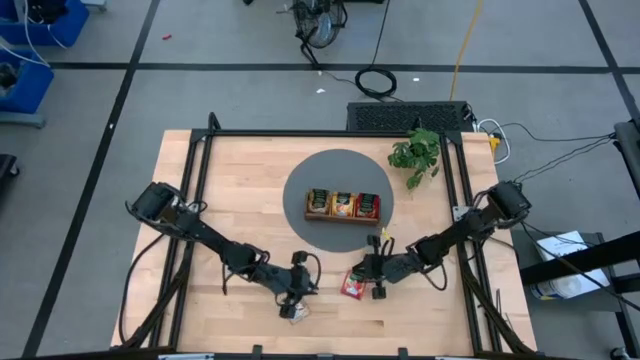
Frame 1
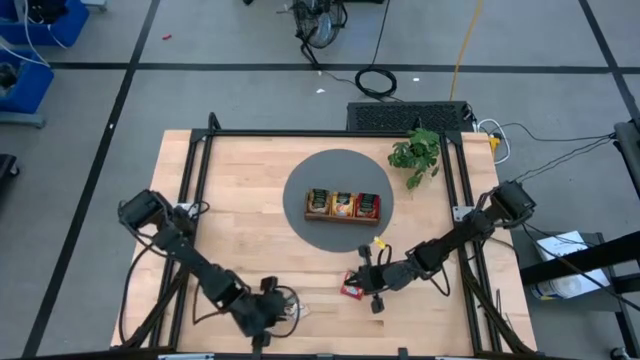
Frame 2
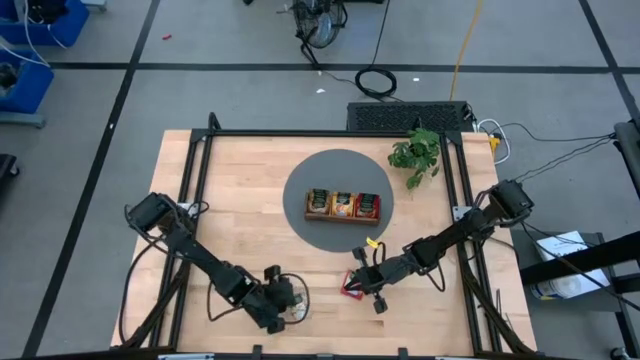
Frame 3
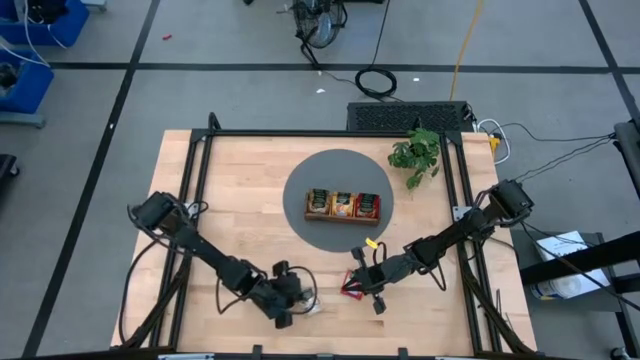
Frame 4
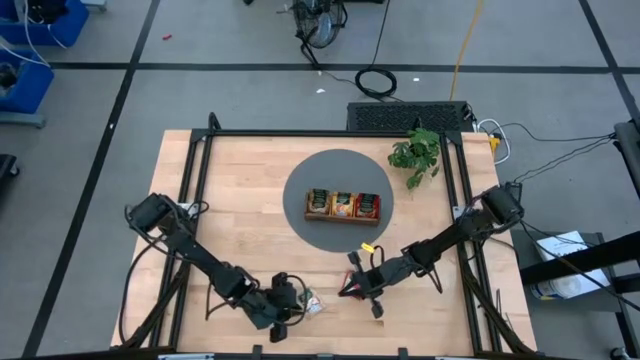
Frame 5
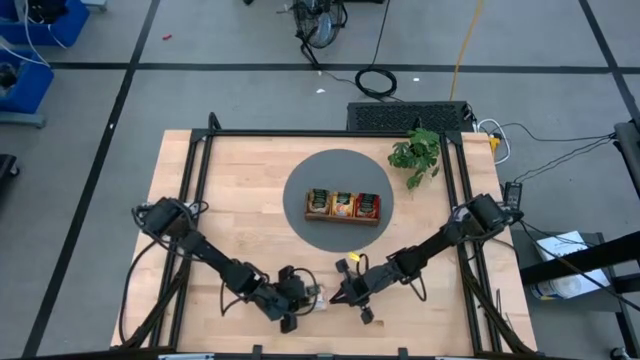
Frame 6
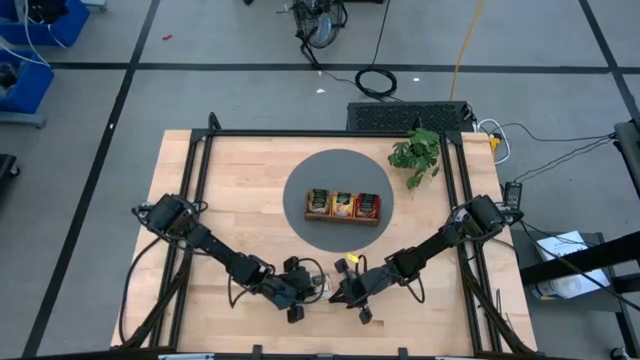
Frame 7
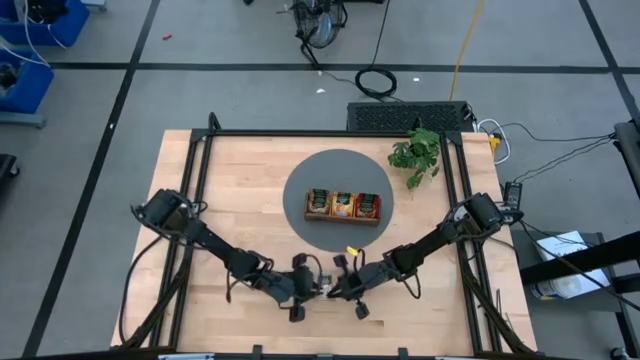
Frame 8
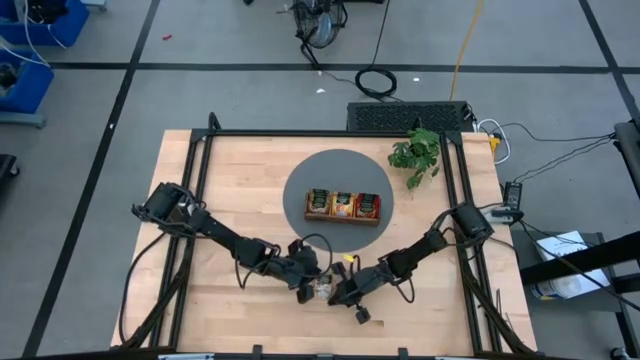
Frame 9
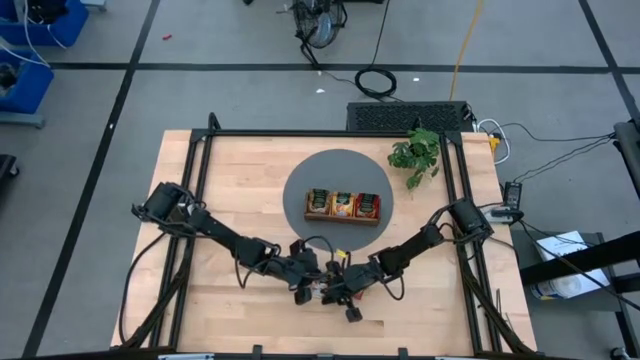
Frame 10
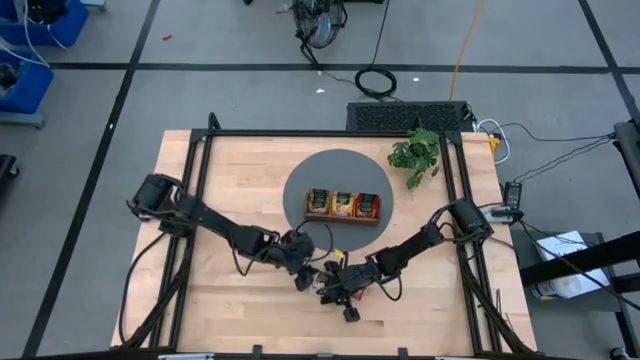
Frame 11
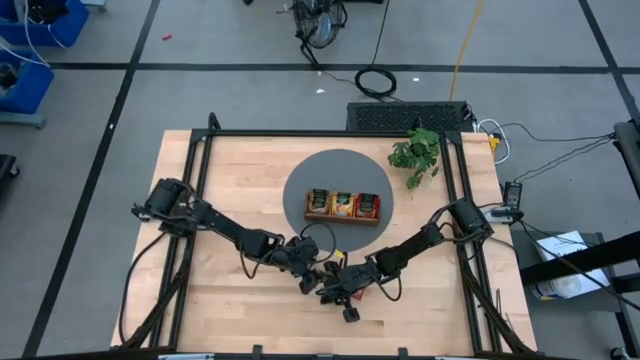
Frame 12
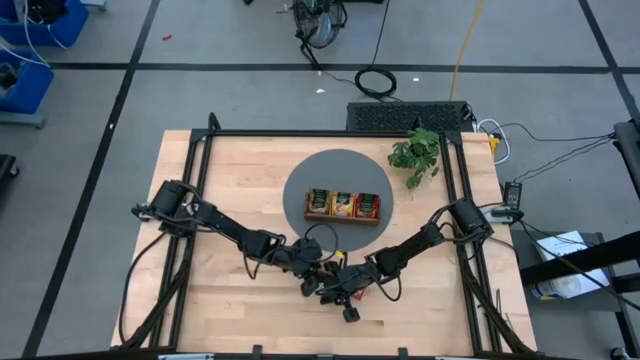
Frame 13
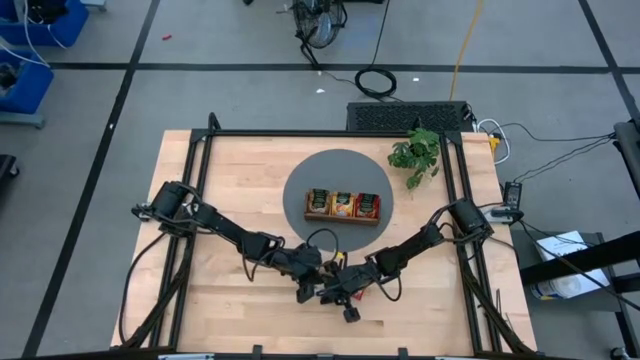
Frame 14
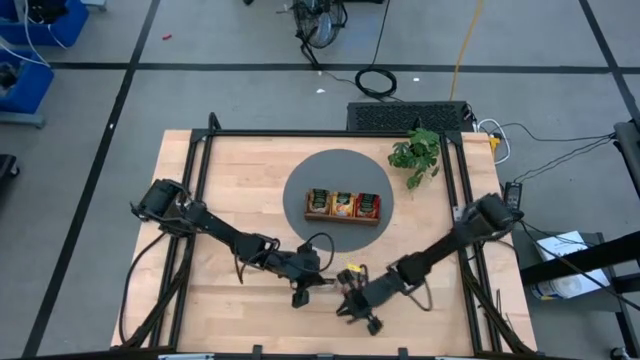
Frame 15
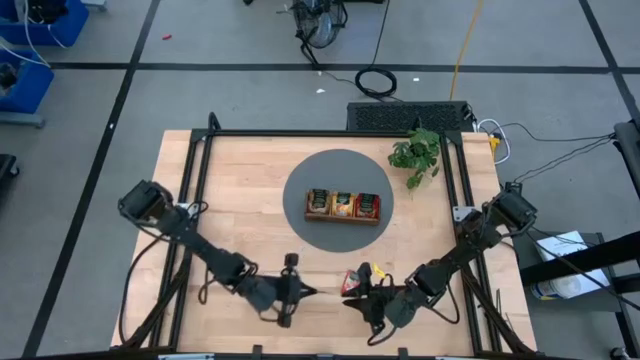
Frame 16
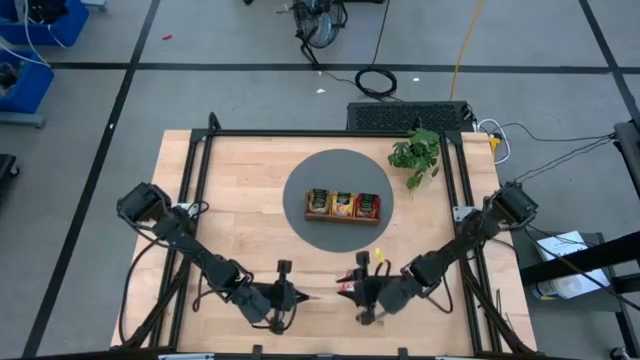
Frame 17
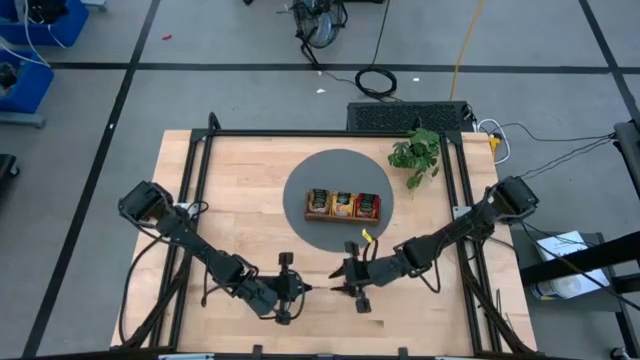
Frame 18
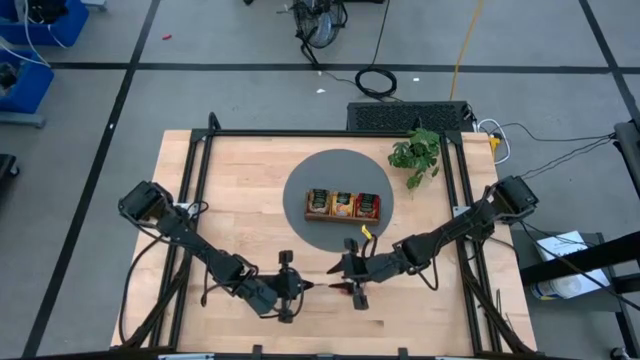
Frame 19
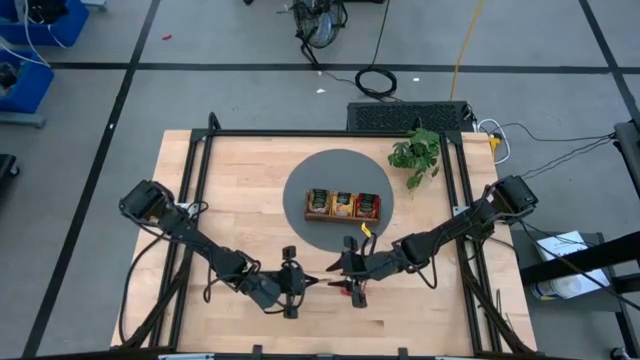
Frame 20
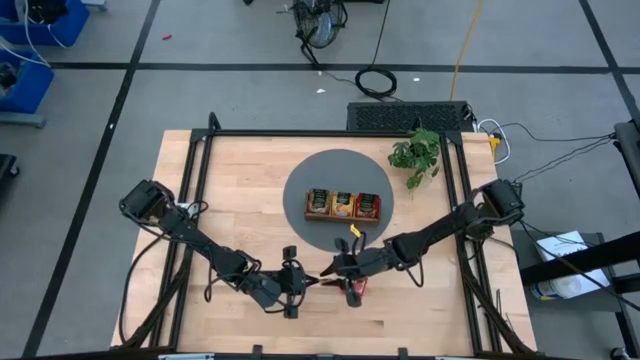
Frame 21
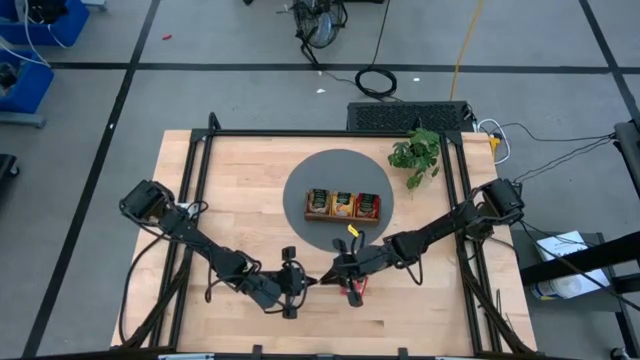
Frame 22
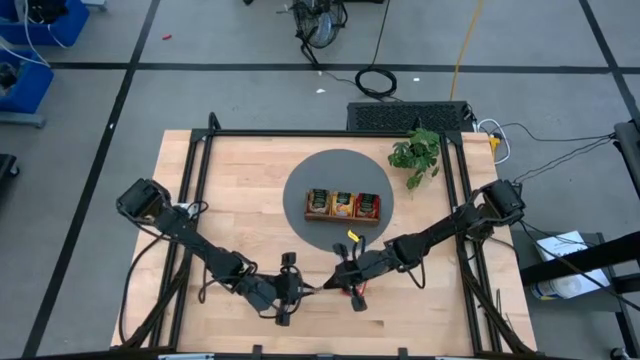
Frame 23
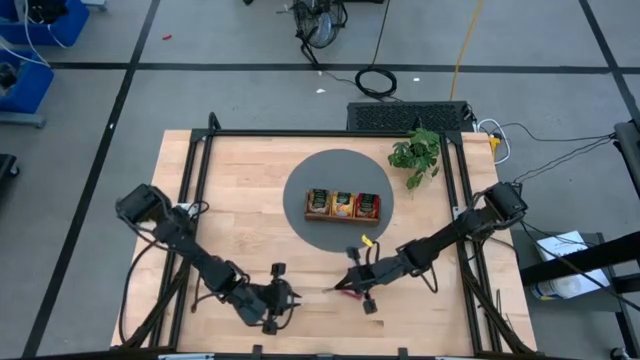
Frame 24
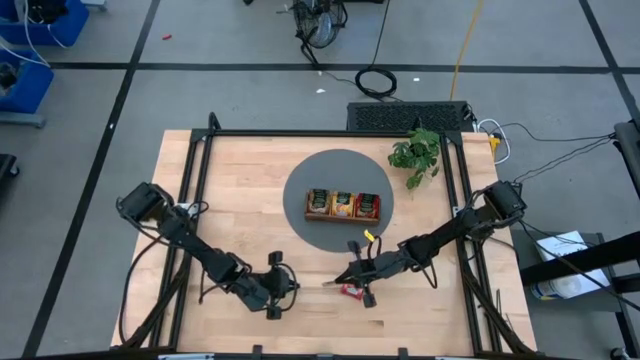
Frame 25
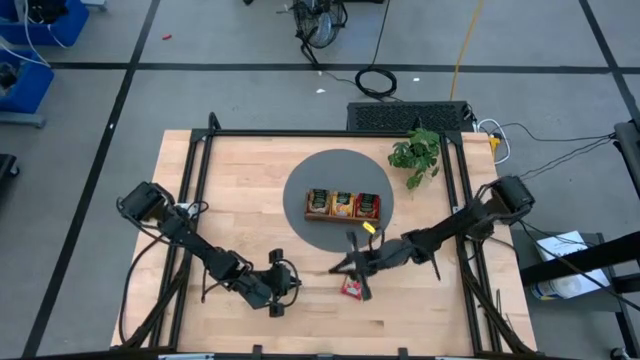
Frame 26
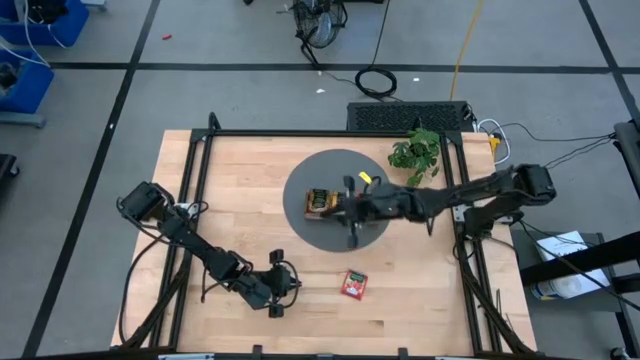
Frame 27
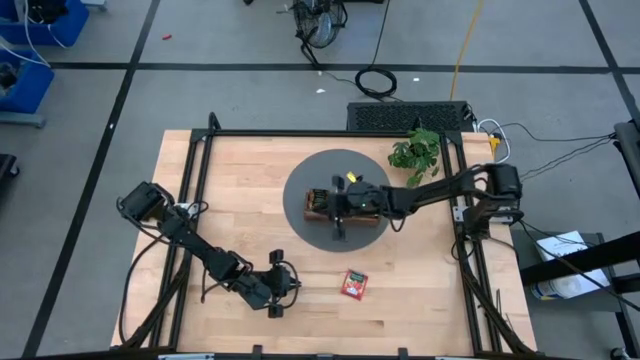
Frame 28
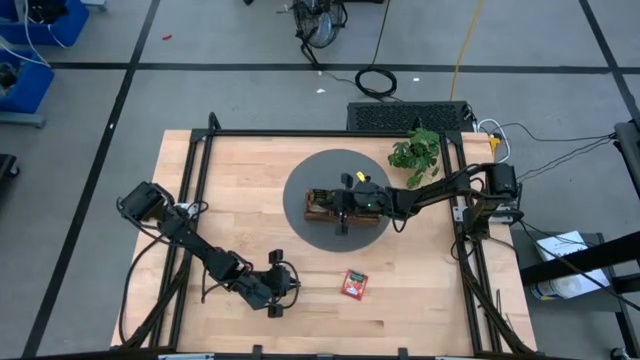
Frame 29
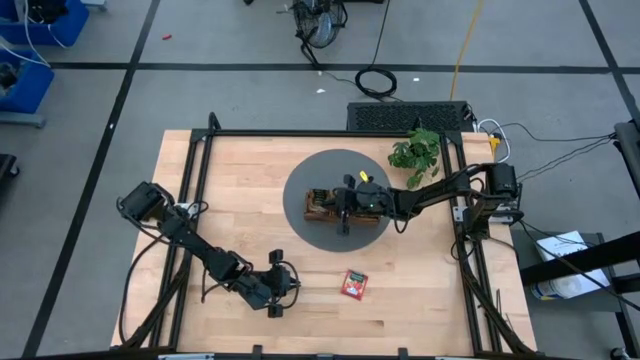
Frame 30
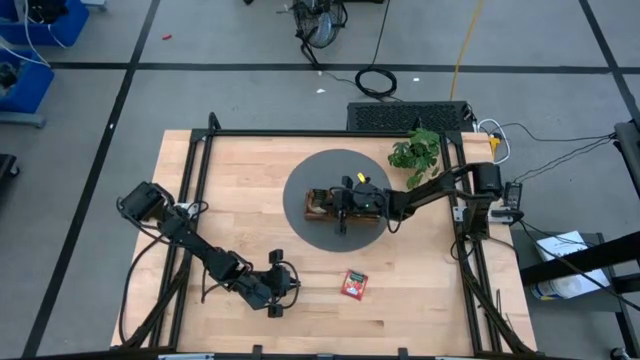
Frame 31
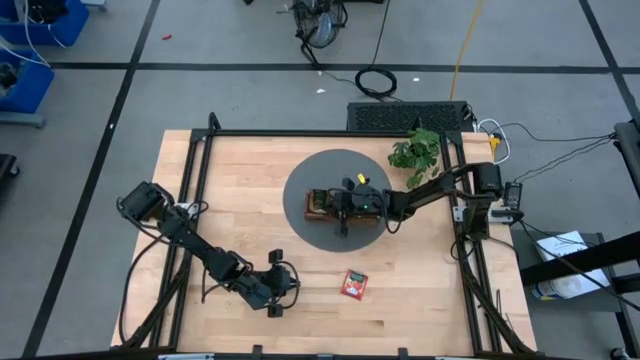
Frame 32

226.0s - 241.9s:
Task: Pick & Place Tea
Put the brown tea bag into the left slot of the wooden organizer

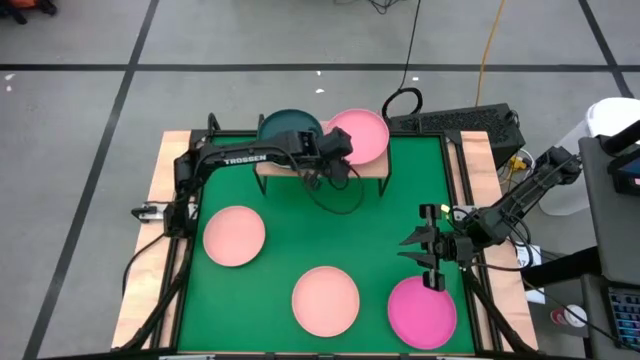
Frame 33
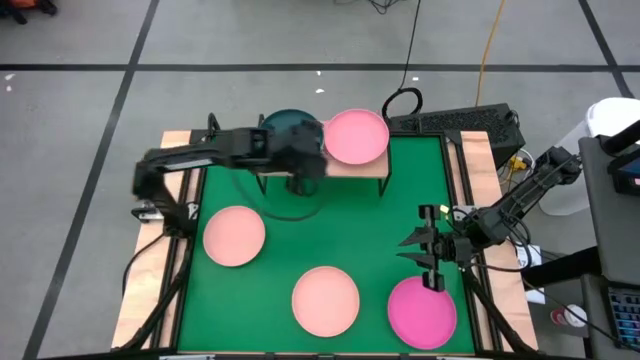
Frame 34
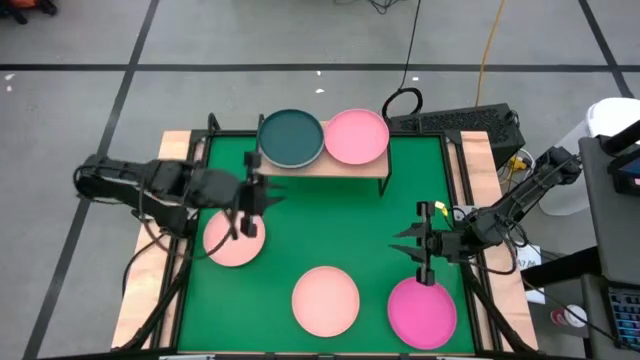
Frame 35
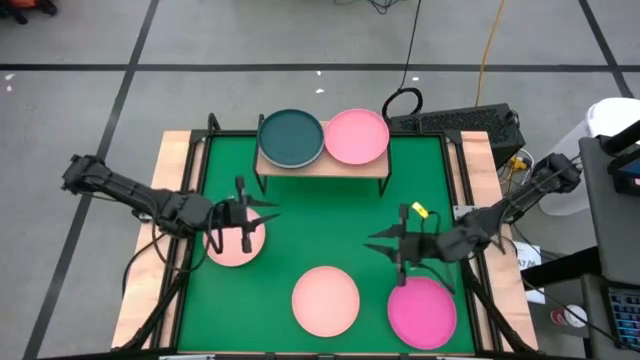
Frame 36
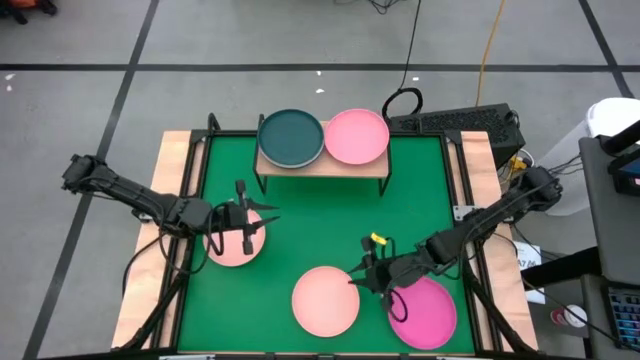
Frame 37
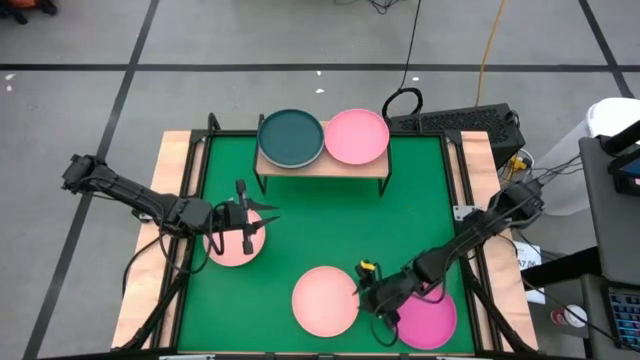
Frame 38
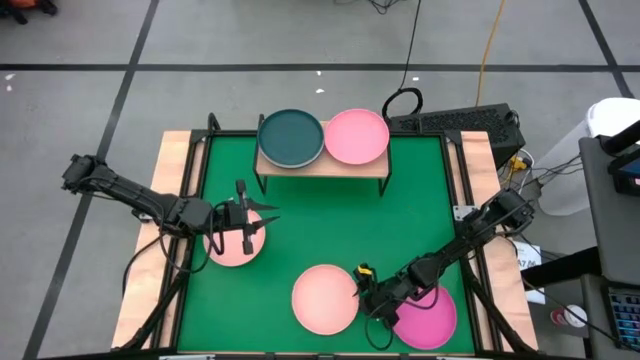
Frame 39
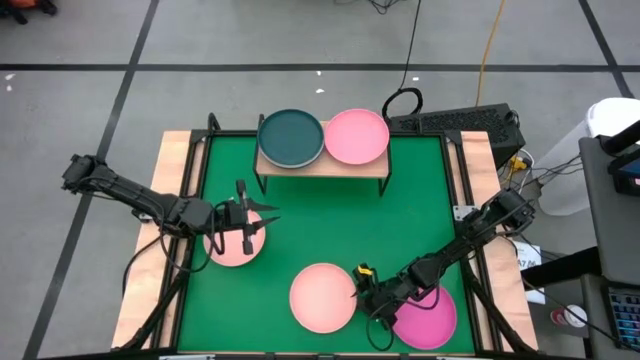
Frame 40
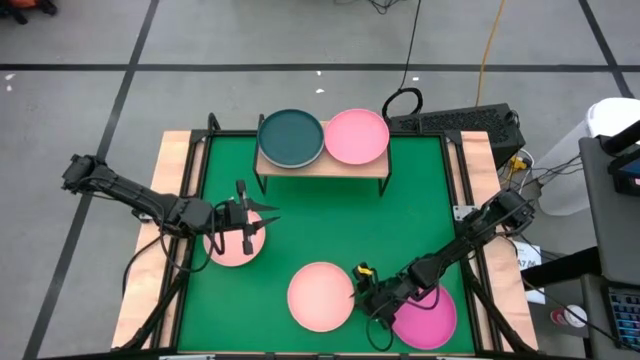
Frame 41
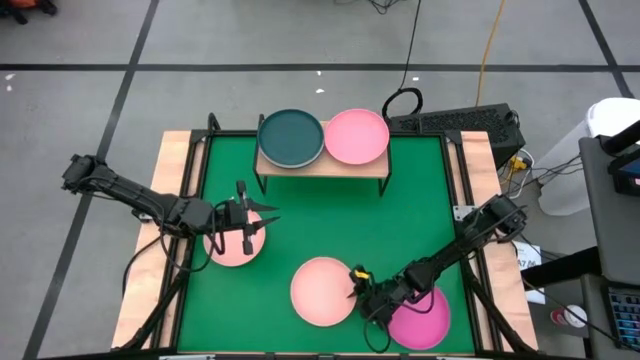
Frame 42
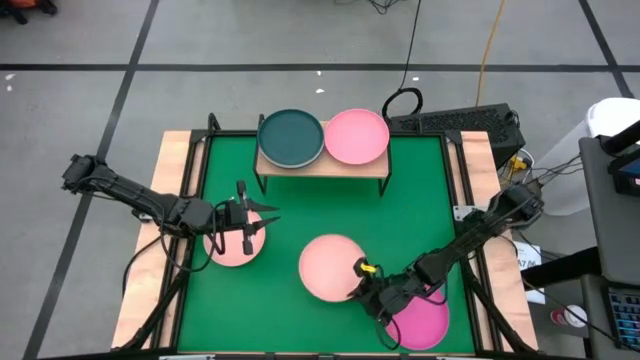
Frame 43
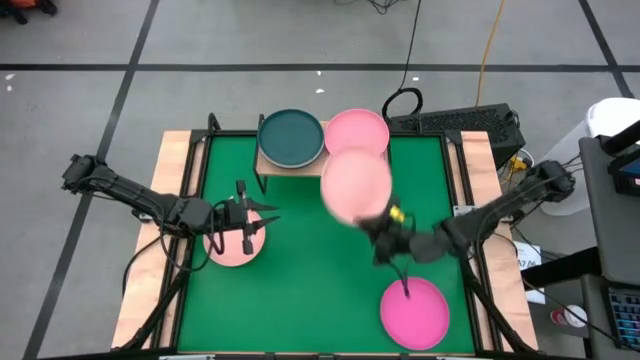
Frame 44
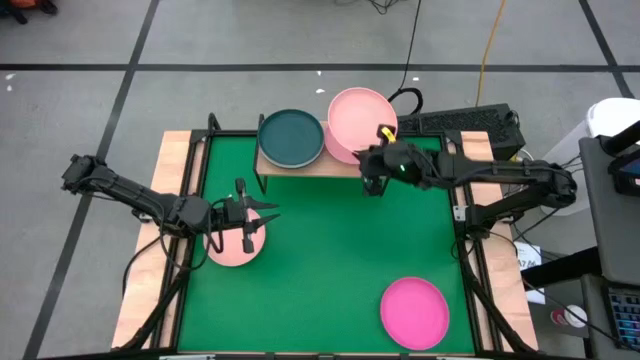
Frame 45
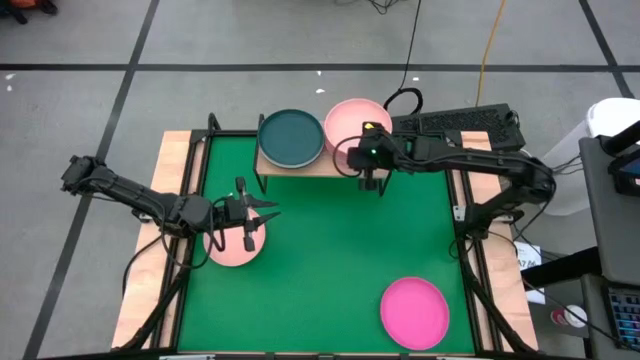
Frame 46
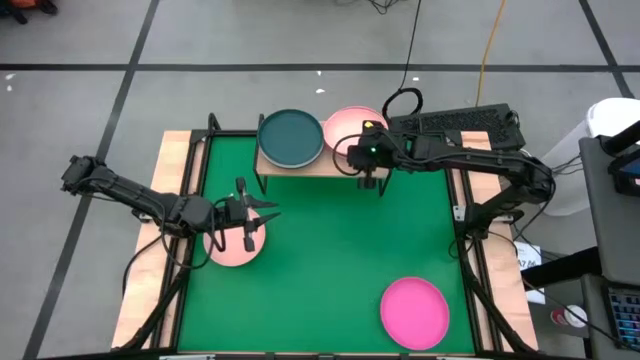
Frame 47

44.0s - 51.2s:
Task: Place and stack plates onto a shelf
Stack the bottom right light yellow plate on top of the light pink plate on the shelf
